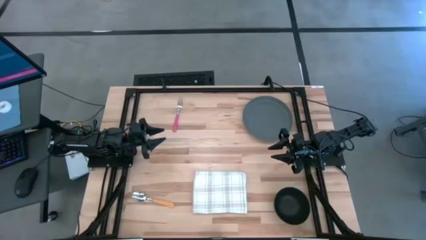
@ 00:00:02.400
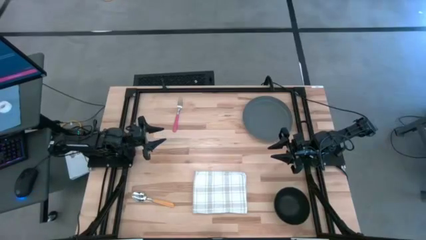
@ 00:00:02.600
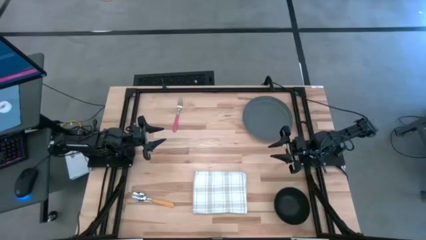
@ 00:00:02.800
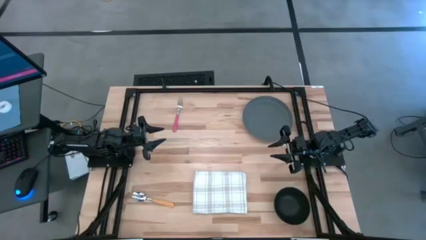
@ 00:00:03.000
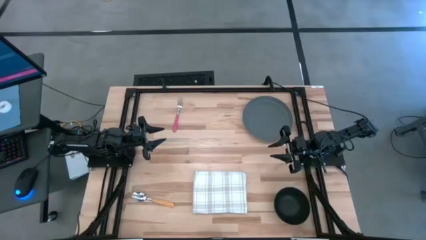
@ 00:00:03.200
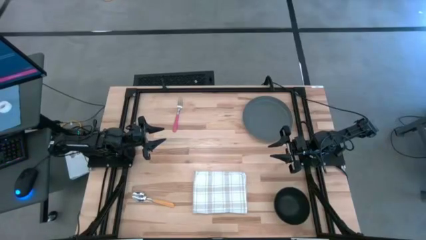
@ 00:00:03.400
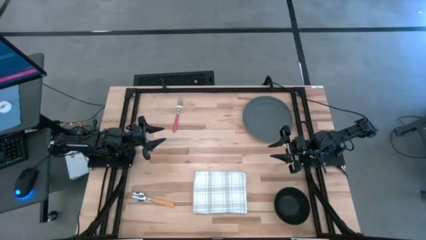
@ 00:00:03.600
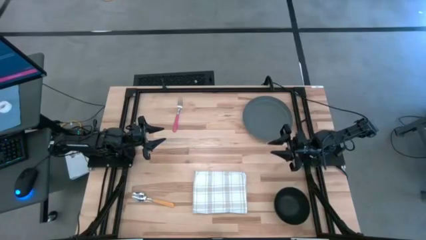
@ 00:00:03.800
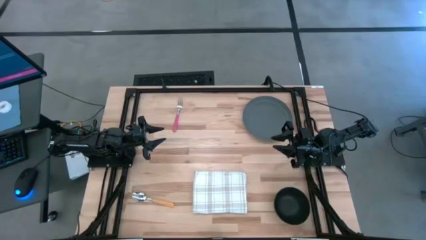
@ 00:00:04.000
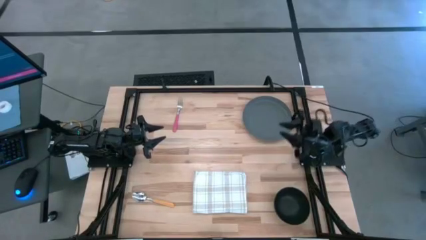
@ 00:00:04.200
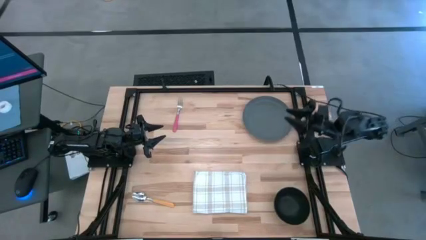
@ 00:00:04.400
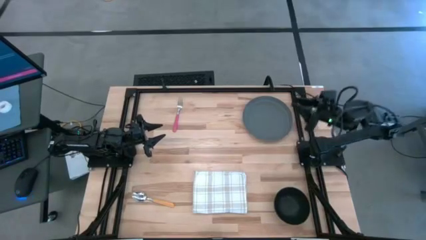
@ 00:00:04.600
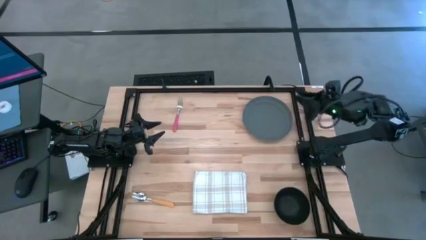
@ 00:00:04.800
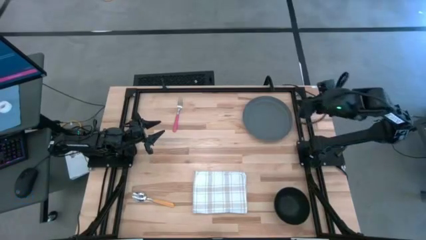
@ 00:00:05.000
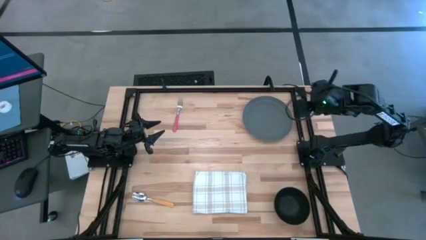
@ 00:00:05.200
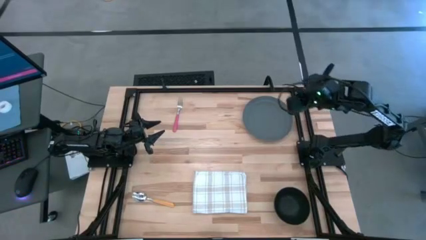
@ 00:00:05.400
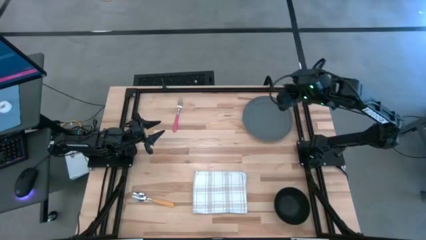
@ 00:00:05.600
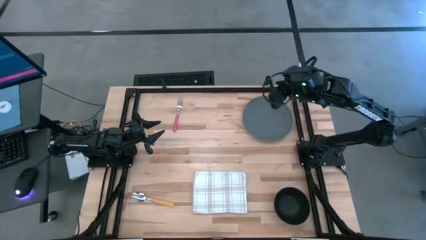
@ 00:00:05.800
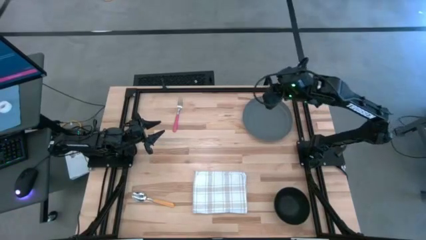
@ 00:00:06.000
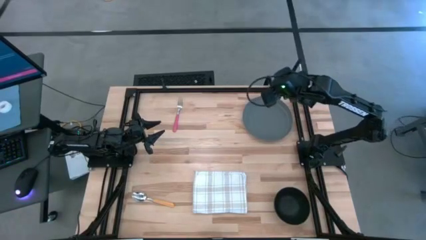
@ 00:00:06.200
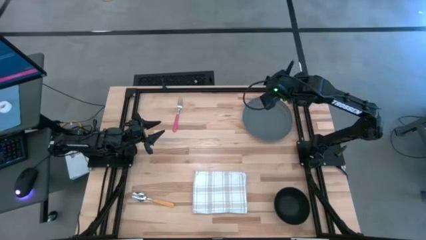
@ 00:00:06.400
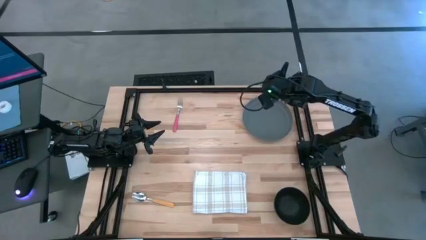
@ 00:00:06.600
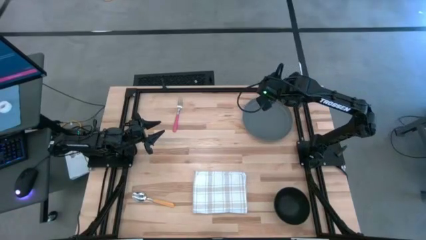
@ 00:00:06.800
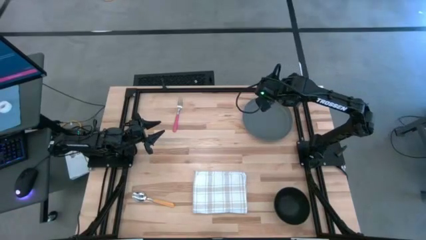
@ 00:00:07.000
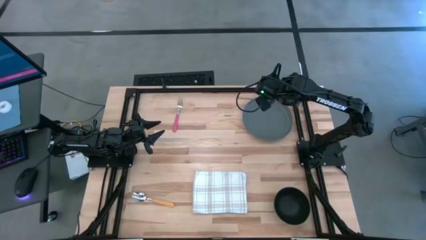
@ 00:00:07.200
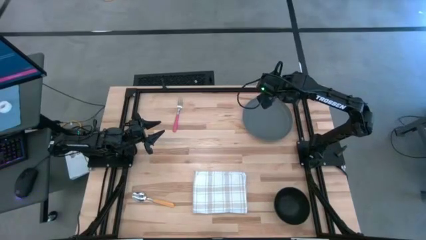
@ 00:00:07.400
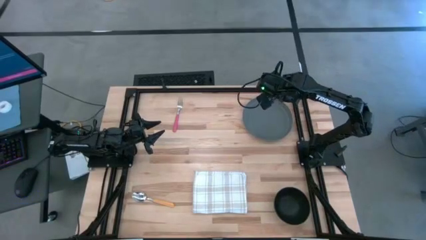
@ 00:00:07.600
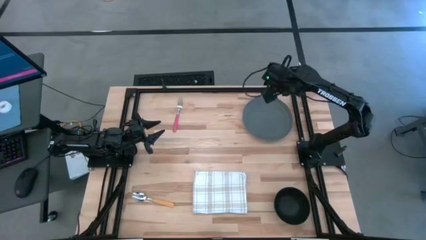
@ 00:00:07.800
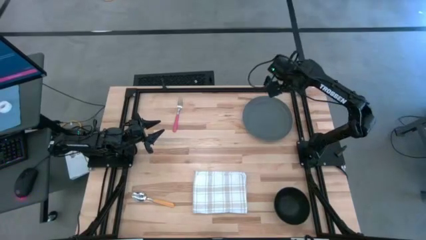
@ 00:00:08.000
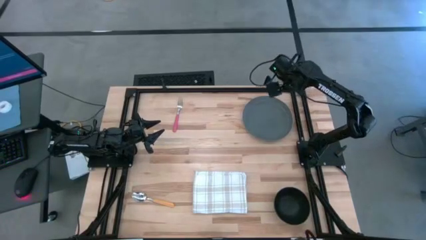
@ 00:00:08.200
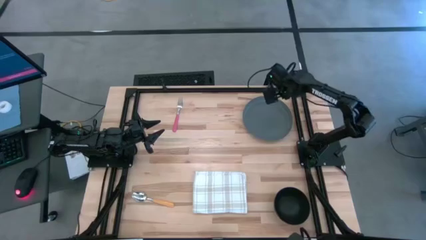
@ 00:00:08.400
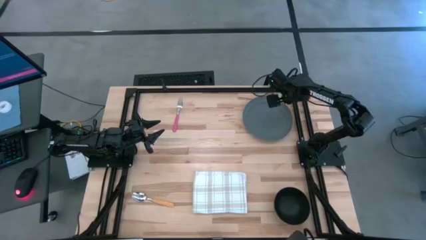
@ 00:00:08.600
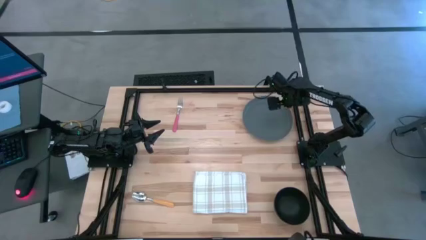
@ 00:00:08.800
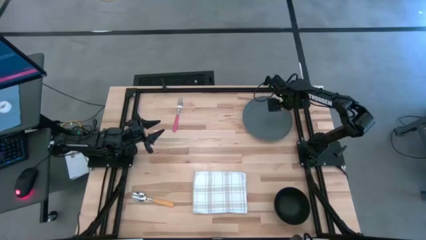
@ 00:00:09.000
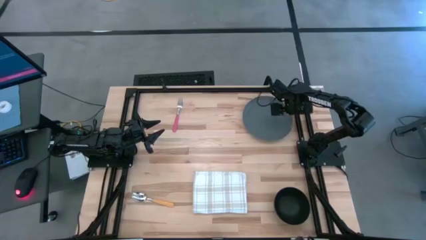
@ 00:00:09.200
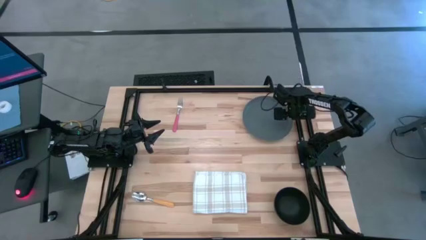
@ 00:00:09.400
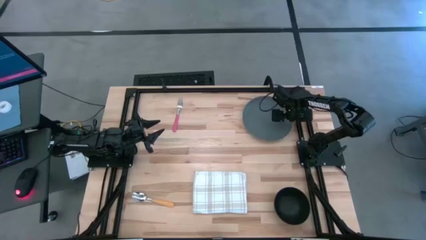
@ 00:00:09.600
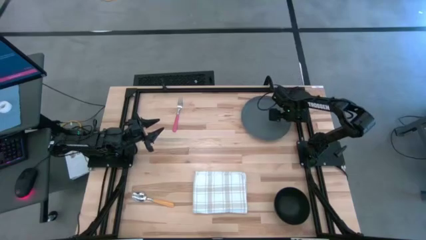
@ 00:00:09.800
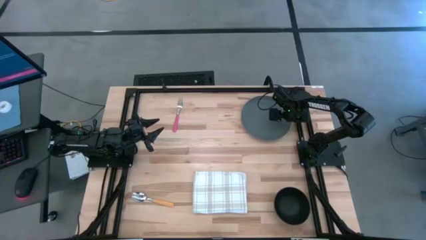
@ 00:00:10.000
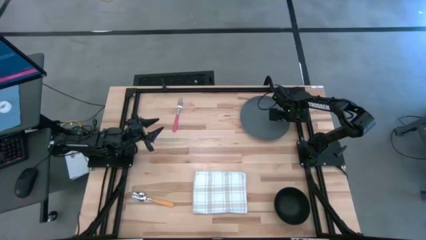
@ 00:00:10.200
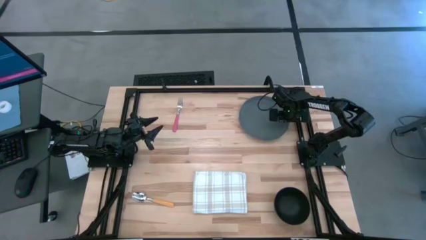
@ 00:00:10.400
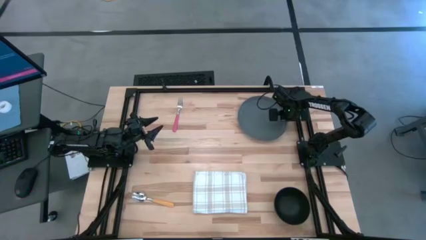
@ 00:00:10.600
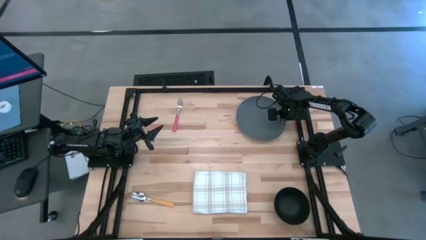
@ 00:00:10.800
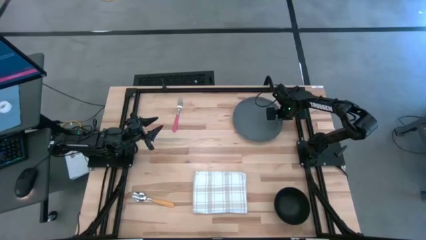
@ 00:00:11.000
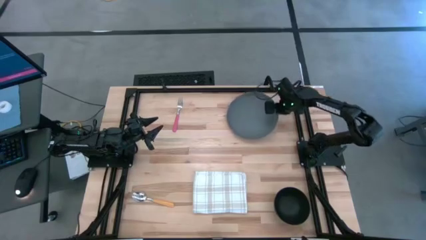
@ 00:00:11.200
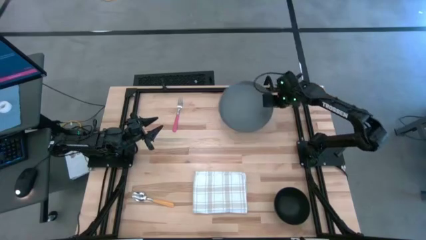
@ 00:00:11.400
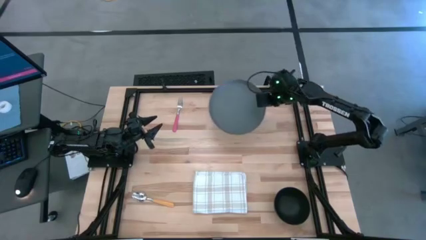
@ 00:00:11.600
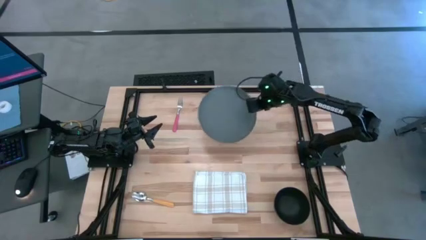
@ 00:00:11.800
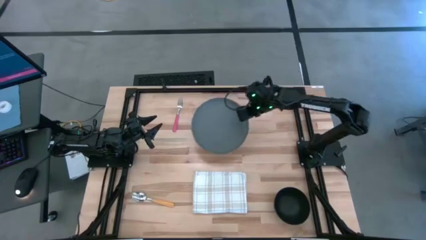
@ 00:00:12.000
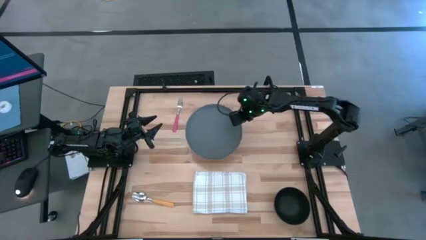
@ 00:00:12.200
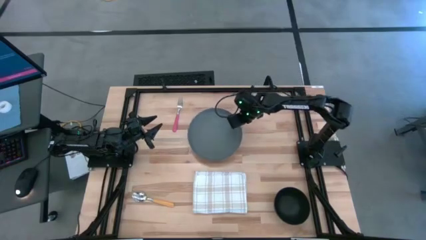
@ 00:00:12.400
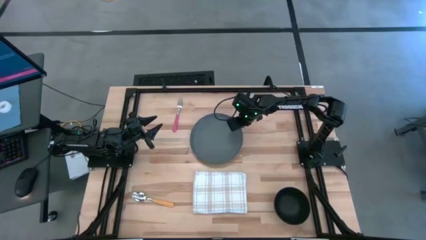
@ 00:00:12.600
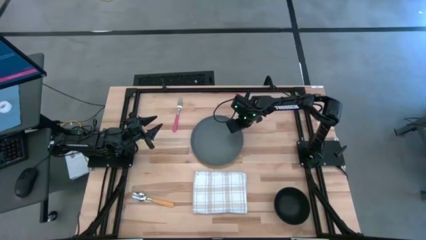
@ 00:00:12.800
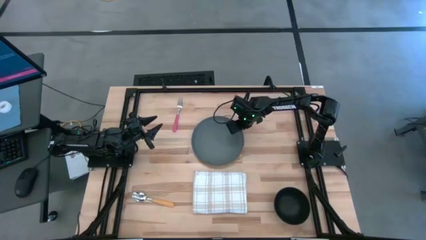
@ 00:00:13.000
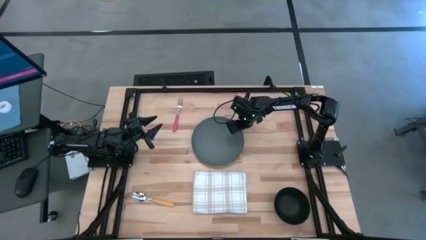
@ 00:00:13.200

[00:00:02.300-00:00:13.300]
Task: Set table place
Move the gray plate to the center of the table
